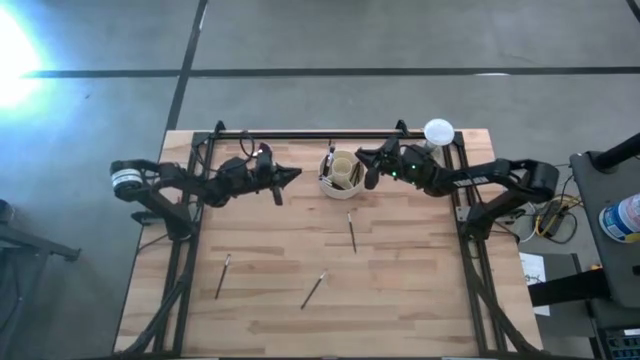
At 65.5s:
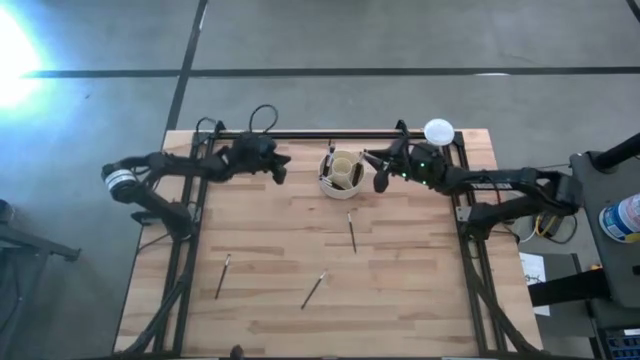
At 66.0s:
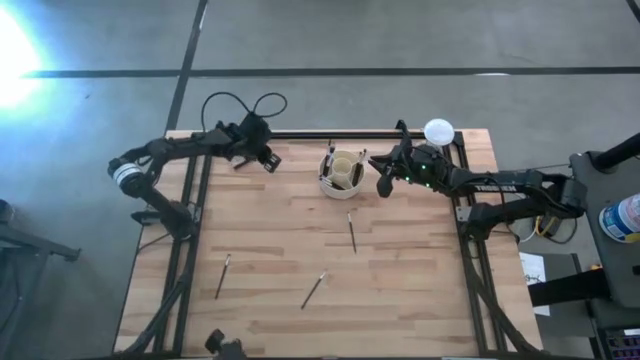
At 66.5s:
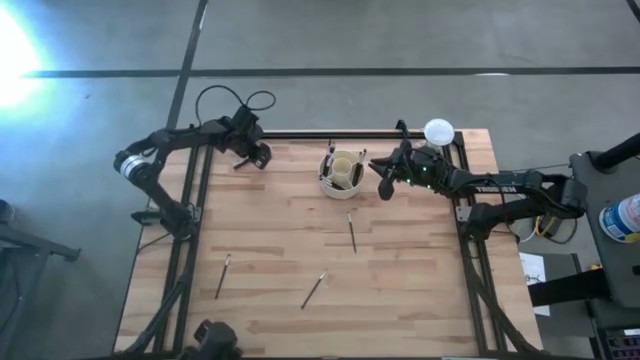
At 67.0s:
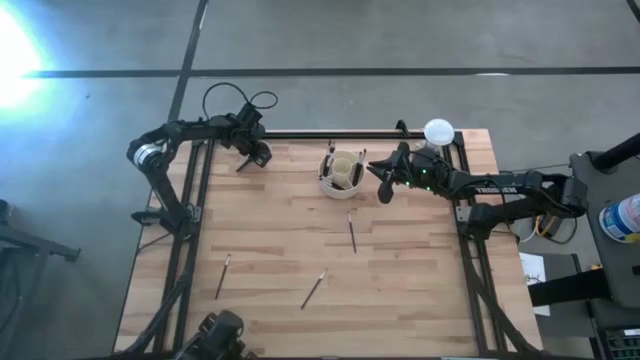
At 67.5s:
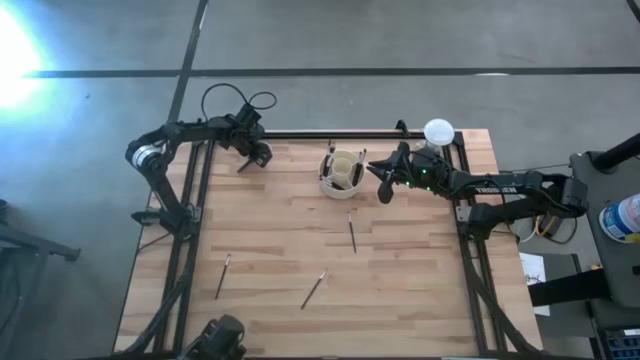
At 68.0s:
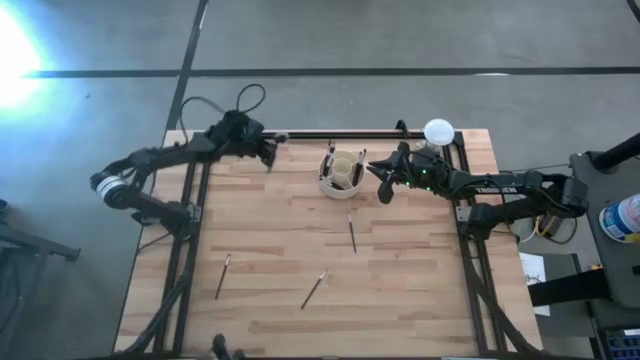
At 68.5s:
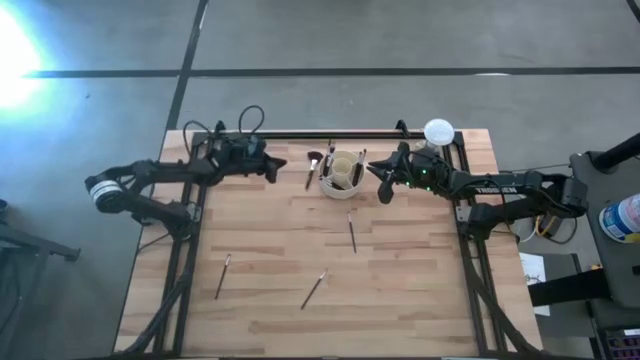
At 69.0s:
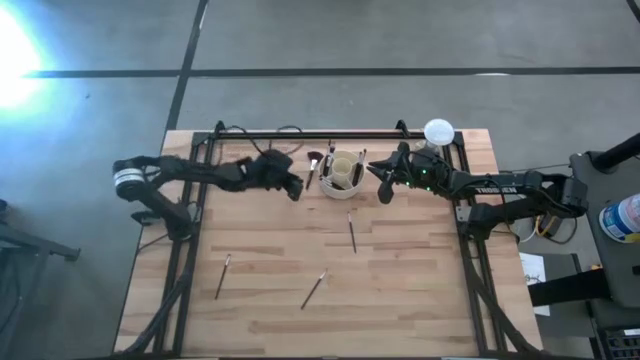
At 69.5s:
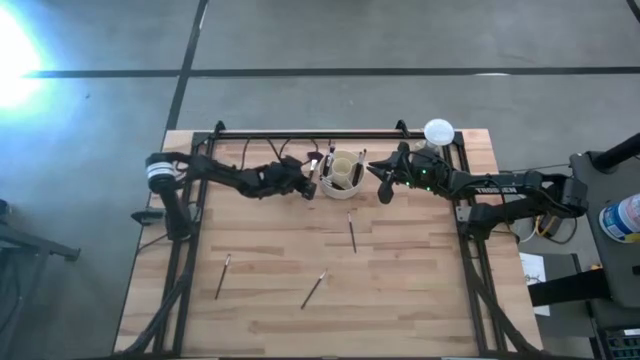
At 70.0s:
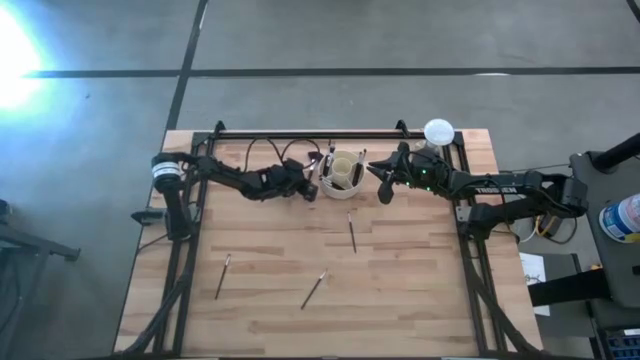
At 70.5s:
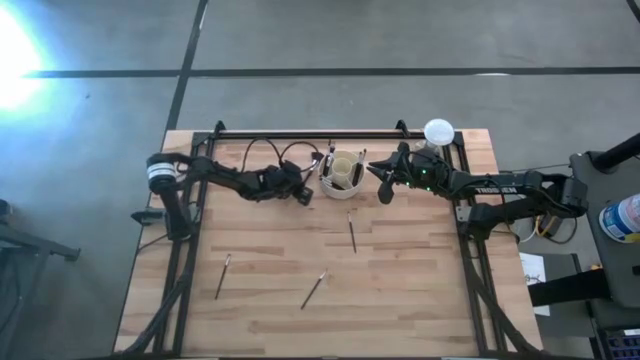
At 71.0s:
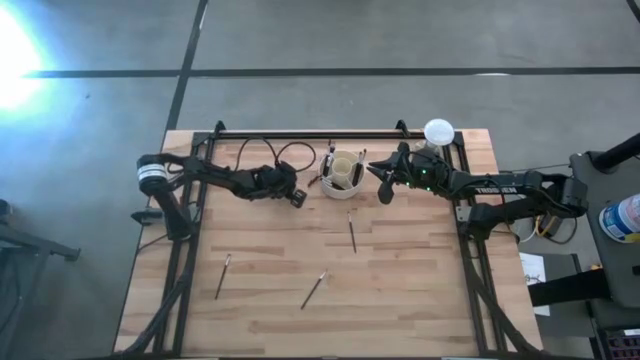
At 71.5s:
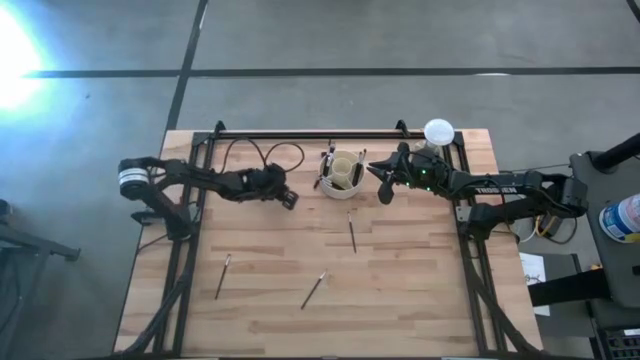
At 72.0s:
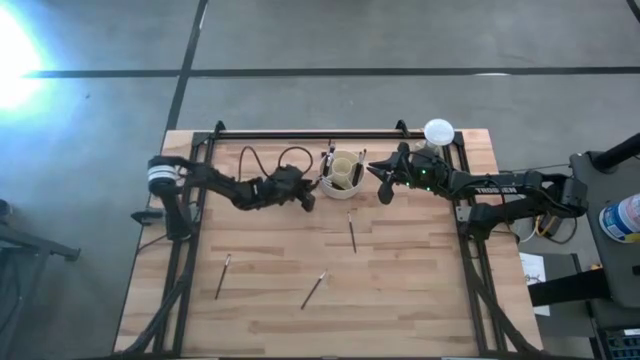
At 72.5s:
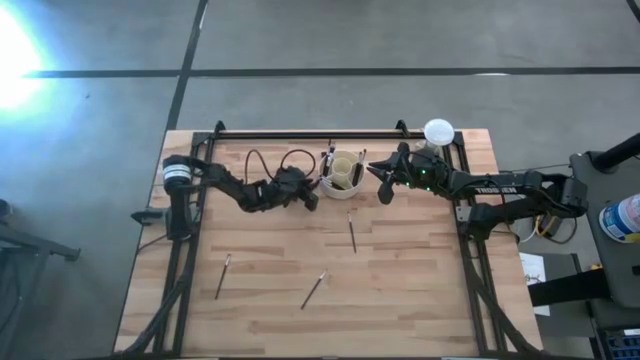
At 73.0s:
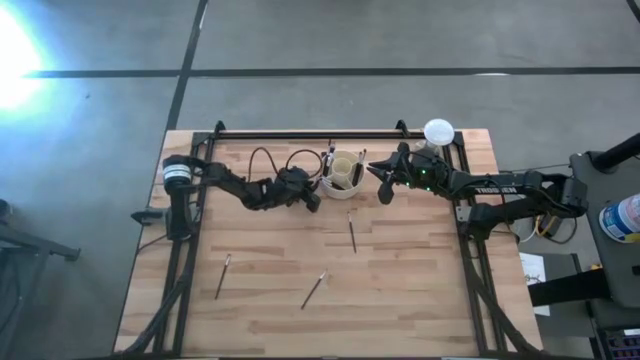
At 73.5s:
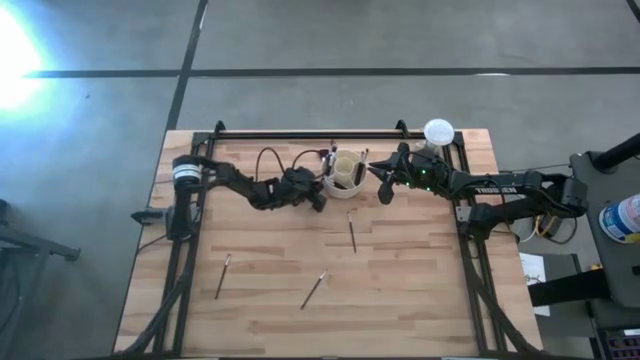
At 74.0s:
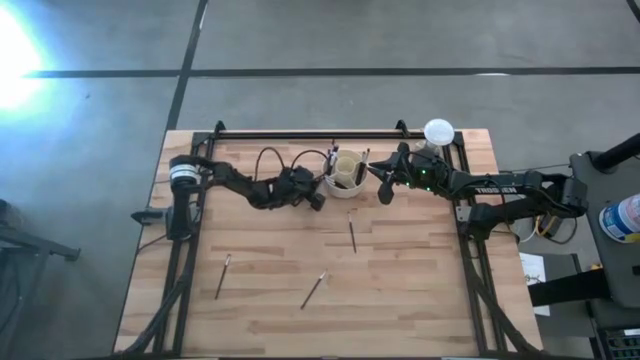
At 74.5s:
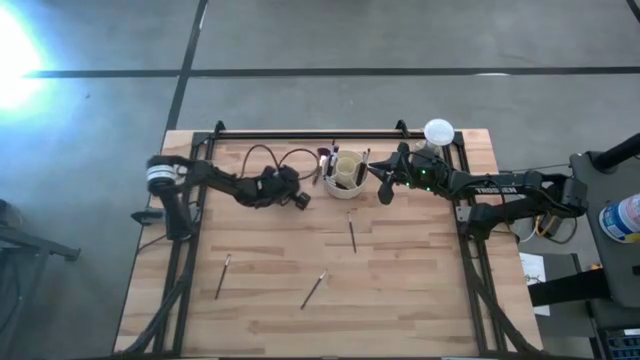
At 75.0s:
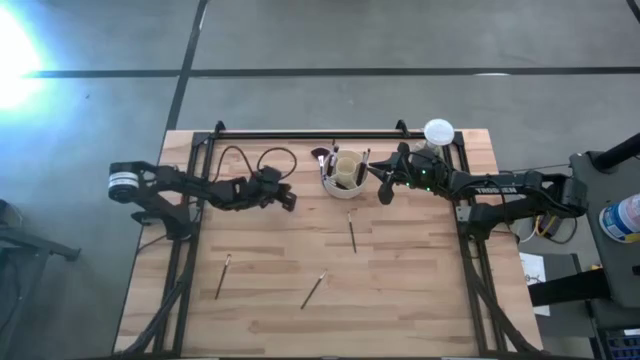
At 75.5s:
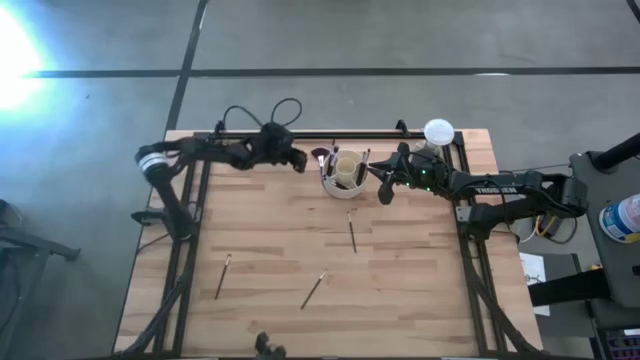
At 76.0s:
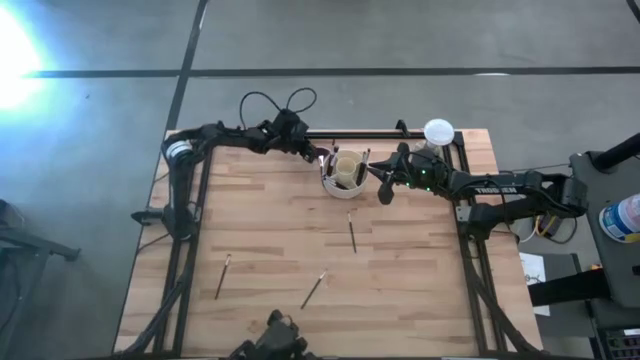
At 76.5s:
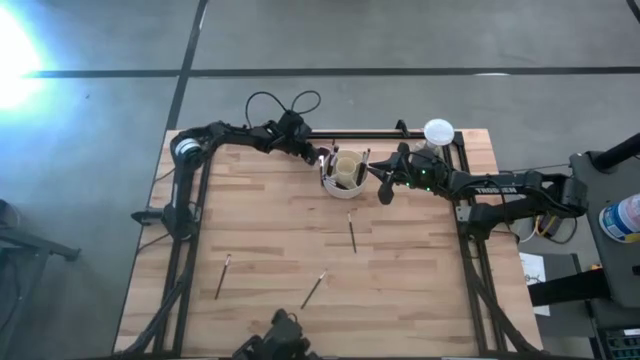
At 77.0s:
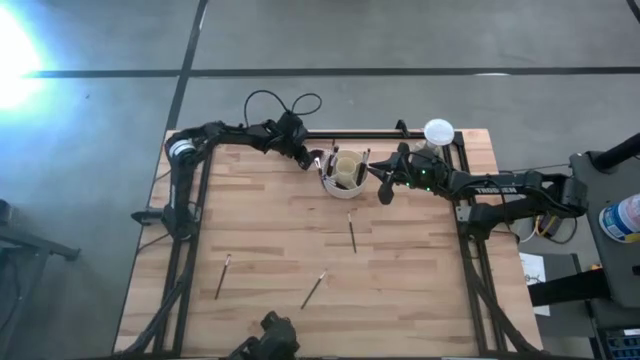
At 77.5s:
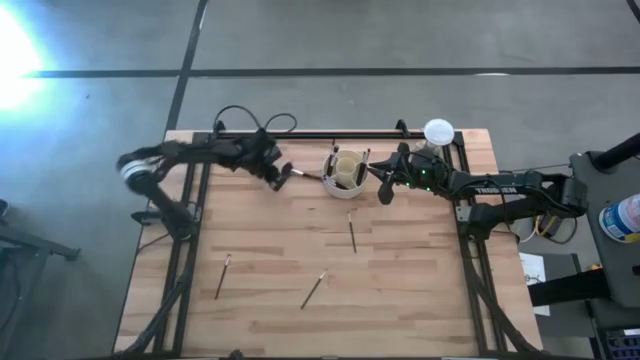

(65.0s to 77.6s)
Task: Put items in baskets/containers
Put the black silver highlighter brush into the pen organizer

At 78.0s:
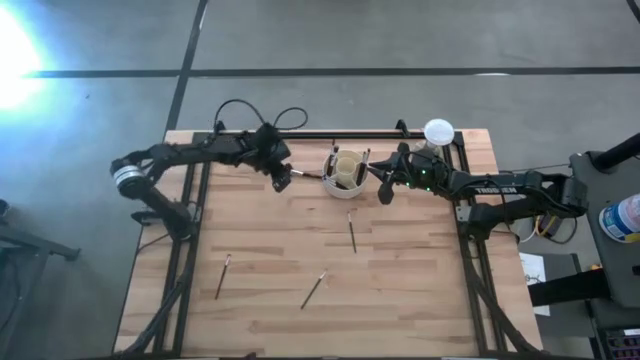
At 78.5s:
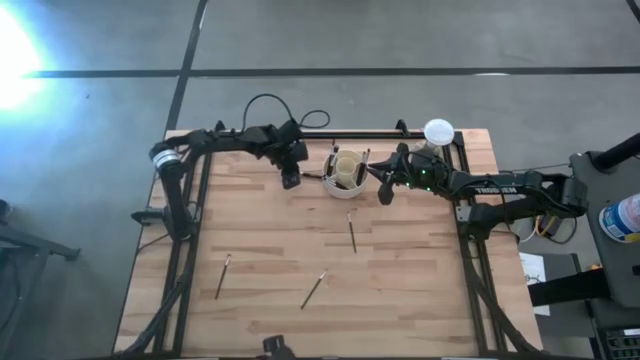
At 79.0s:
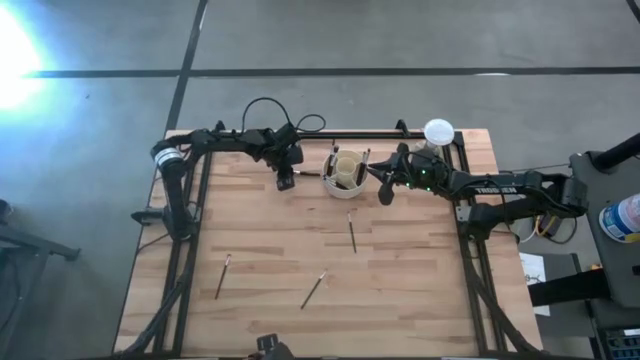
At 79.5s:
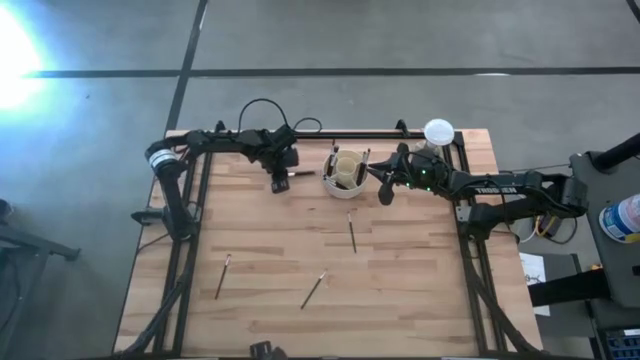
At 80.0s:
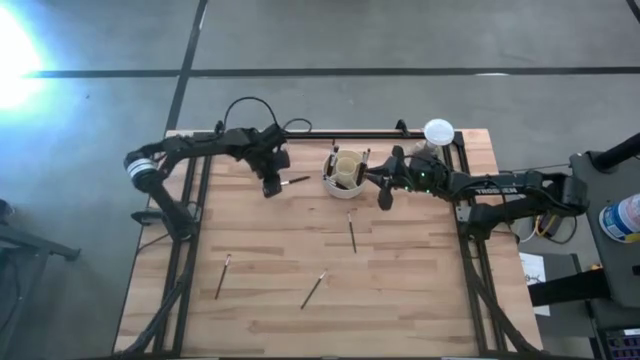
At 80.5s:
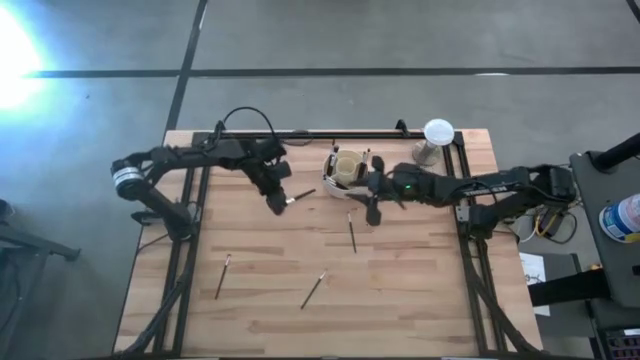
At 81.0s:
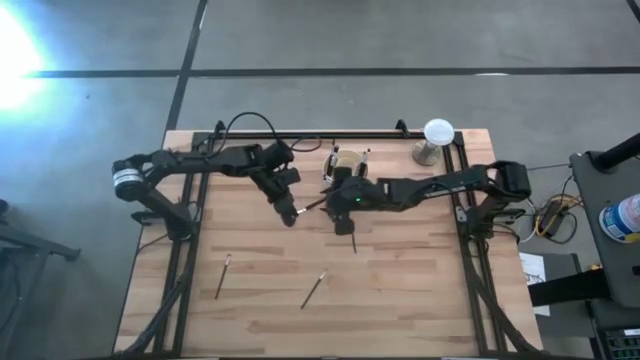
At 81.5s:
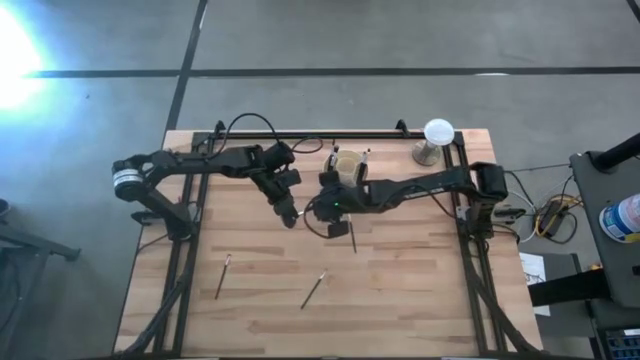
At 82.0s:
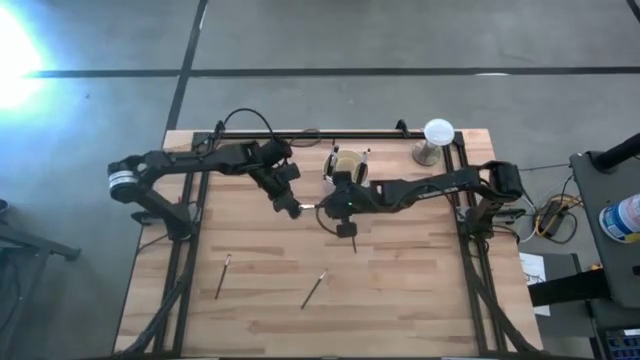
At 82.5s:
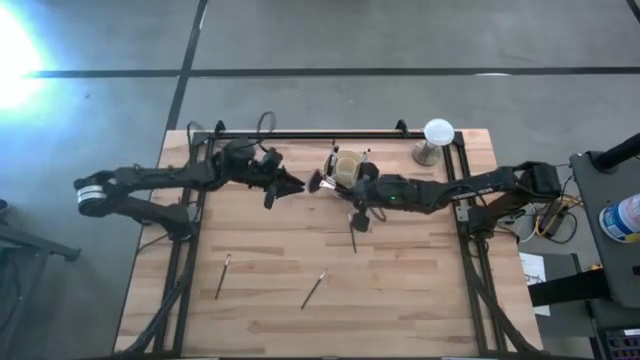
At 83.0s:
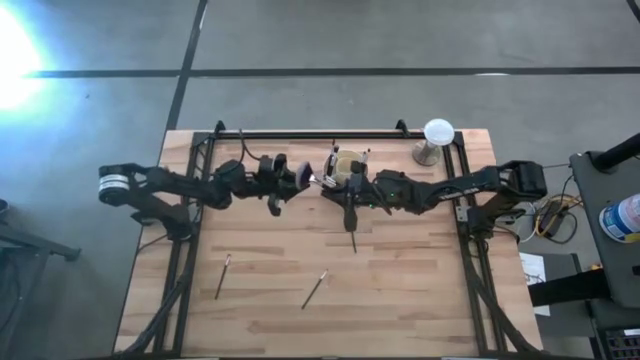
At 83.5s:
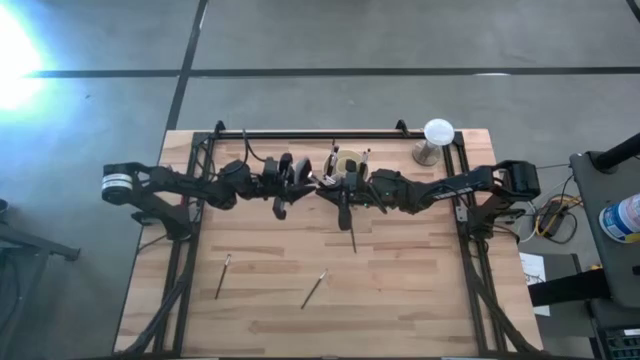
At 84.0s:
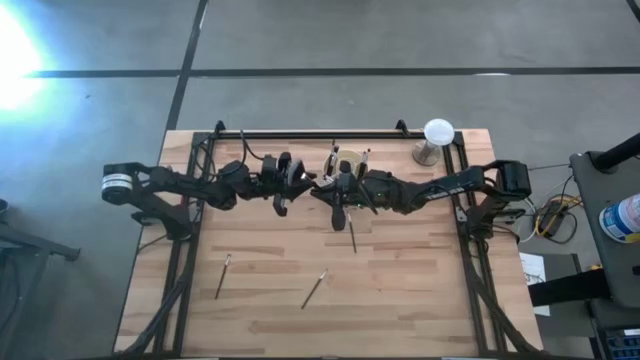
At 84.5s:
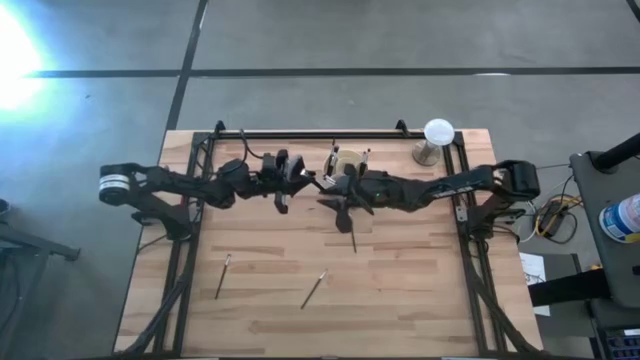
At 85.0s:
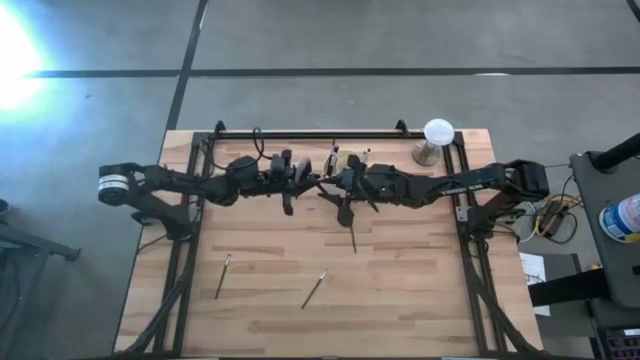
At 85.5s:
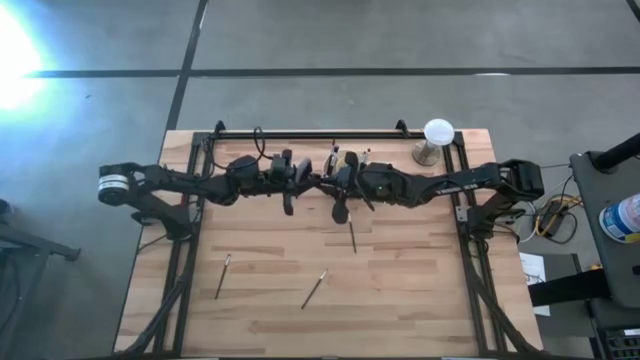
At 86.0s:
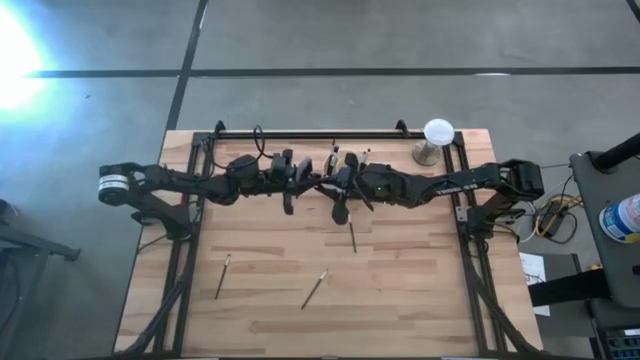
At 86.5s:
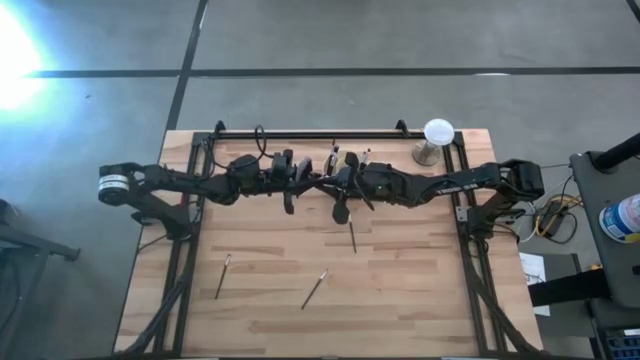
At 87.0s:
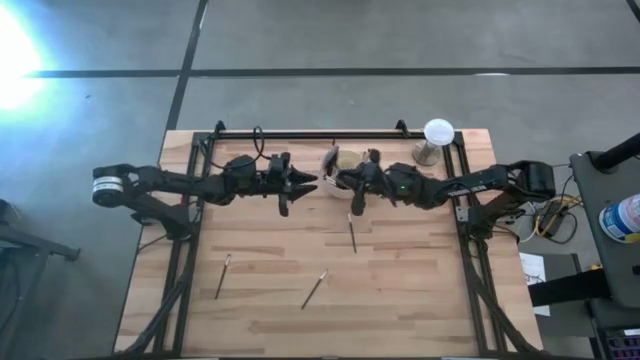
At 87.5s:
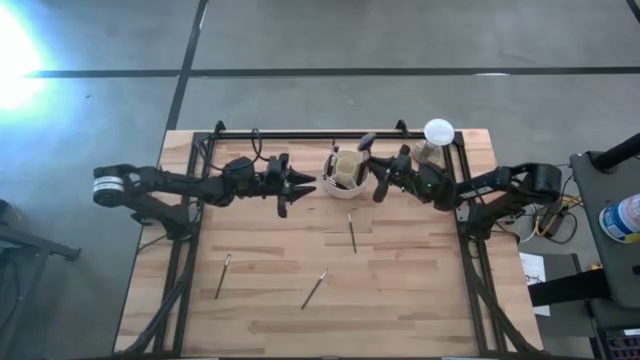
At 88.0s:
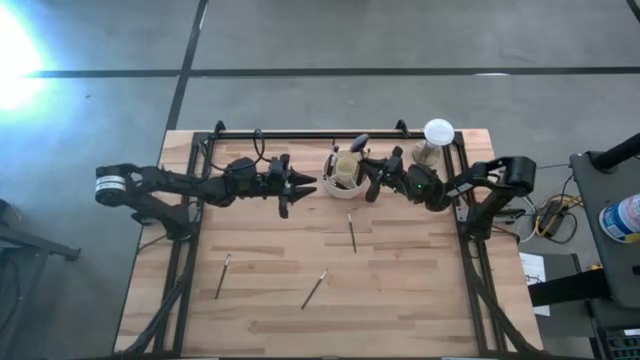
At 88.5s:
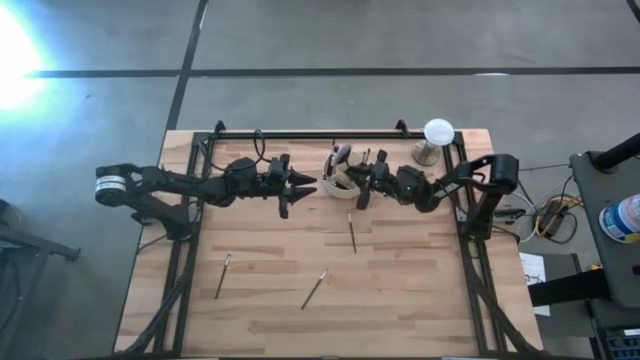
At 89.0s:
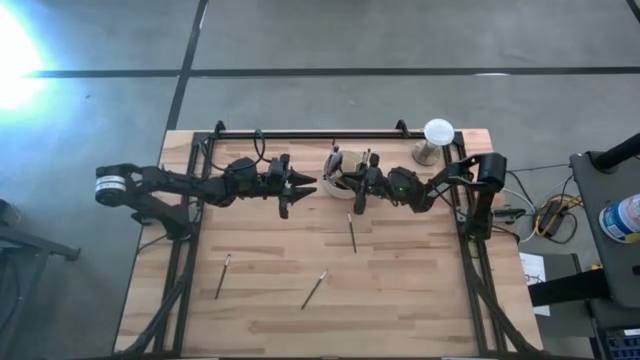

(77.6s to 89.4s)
Put the black silver highlighter brush into the pen organizer
